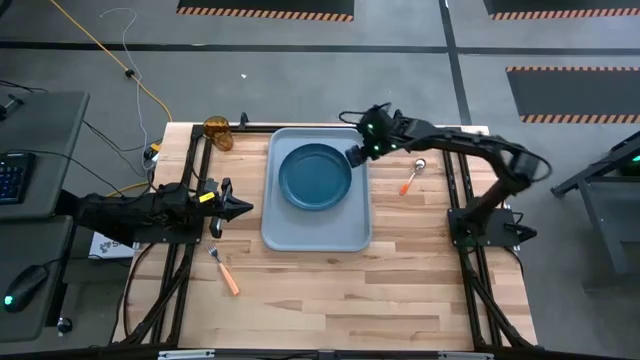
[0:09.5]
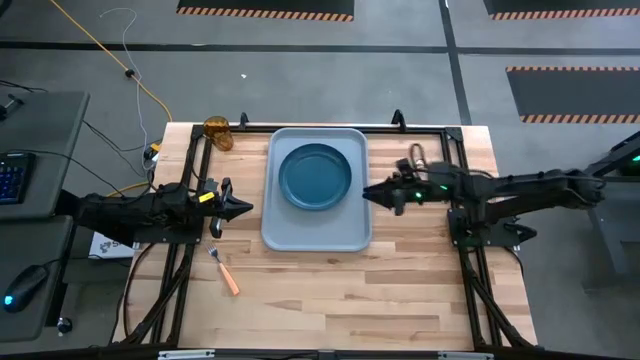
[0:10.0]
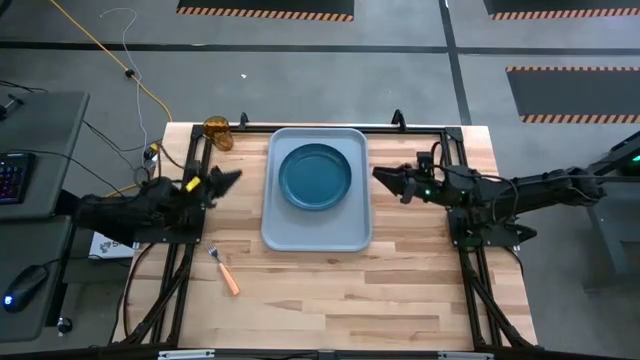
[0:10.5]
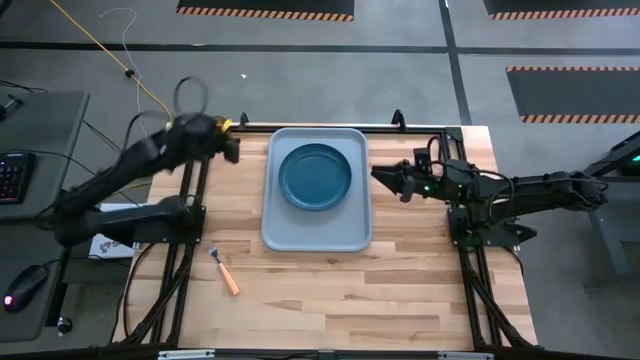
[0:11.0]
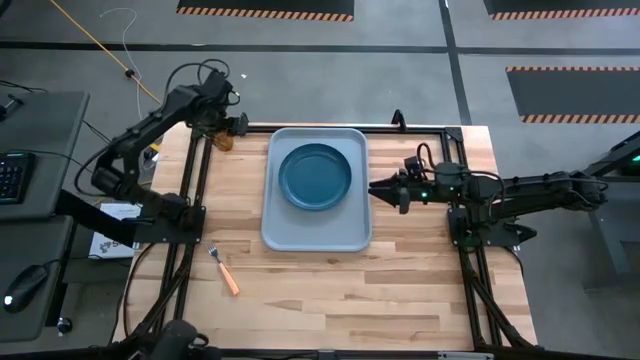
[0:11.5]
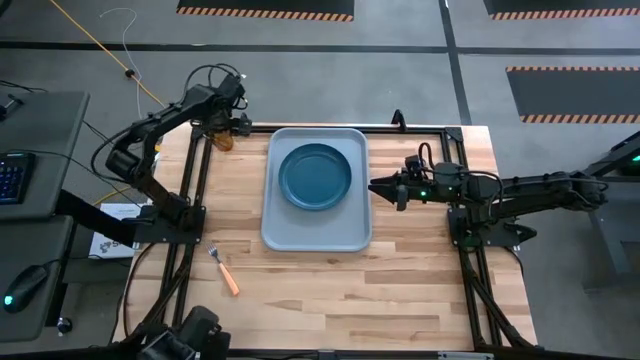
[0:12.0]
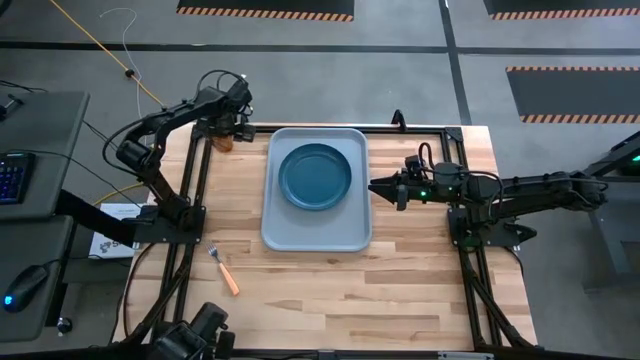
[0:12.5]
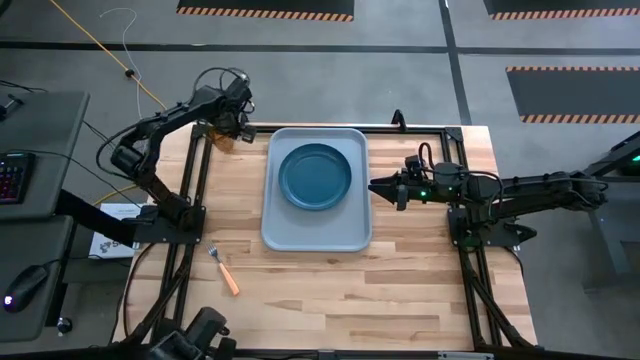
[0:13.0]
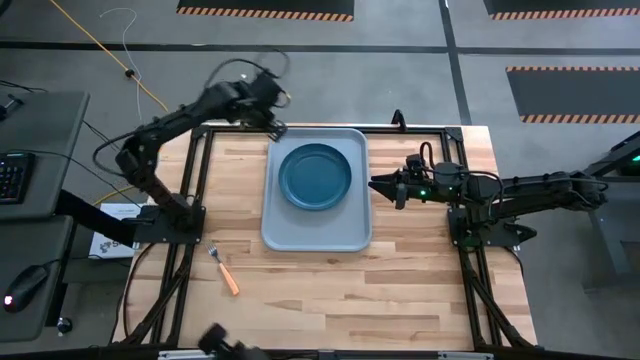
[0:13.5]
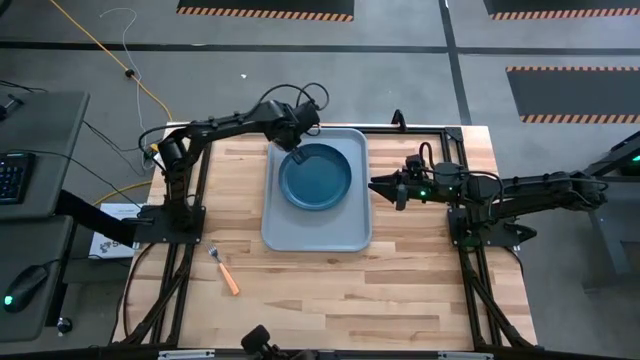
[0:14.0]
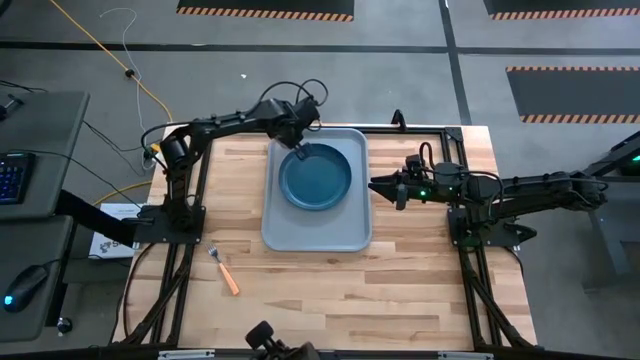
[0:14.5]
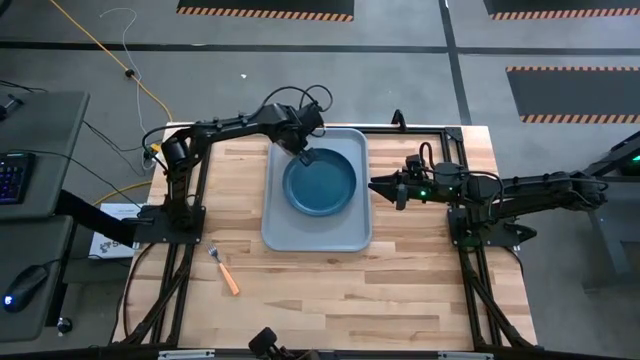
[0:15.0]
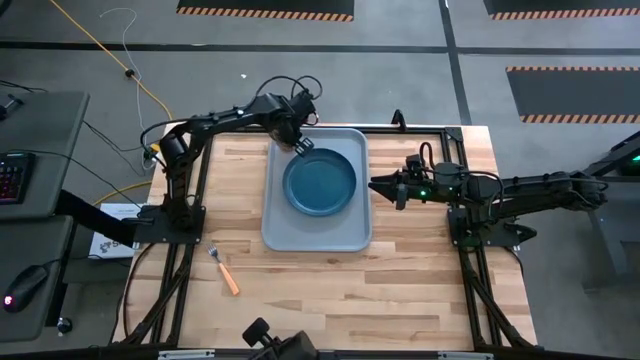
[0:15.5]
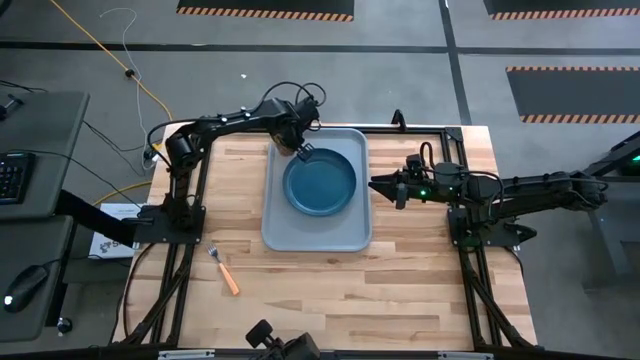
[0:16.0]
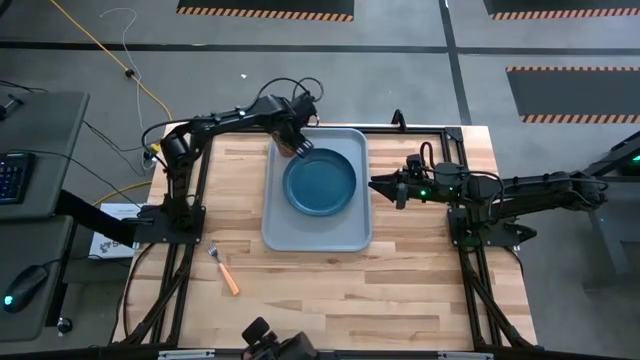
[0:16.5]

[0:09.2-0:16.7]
Task: Pick and place plate/cup/fork/spoon on tray
Put the brown glass on the top left side of the light blue tray

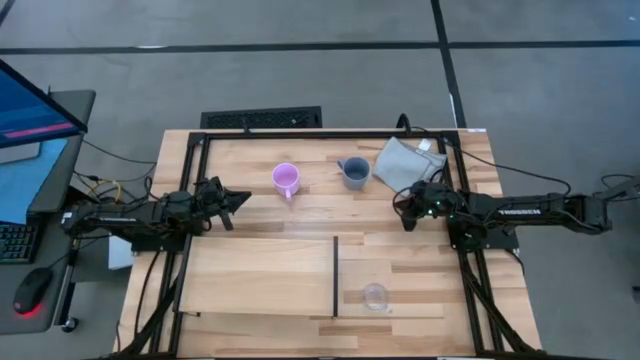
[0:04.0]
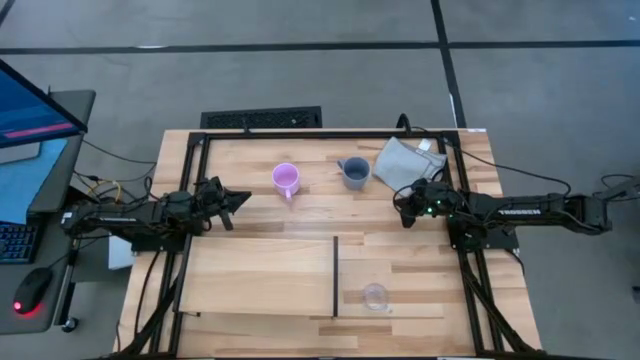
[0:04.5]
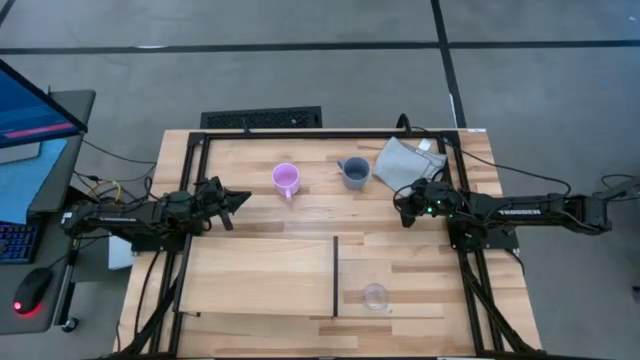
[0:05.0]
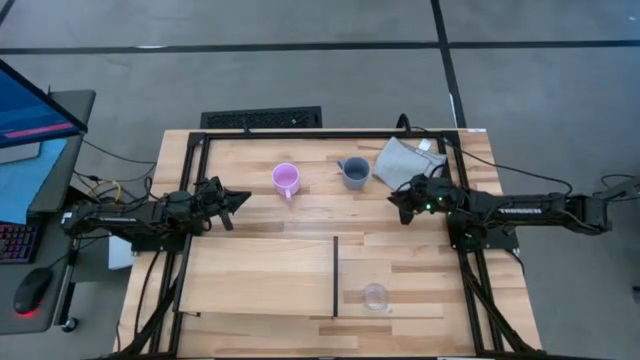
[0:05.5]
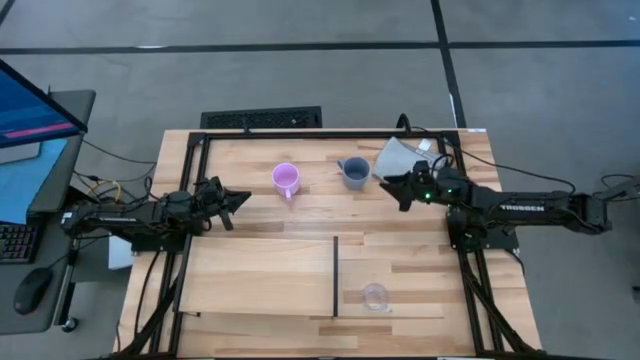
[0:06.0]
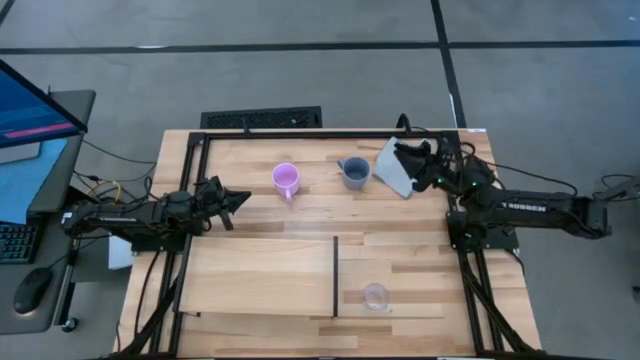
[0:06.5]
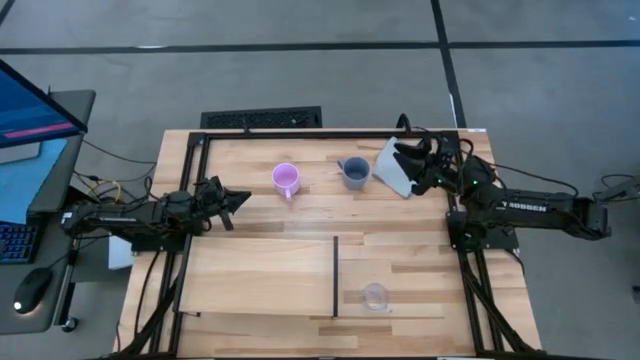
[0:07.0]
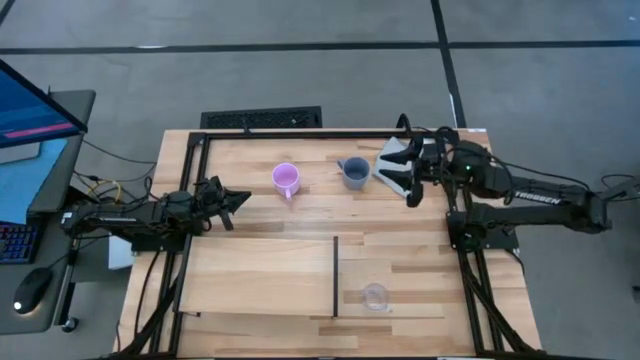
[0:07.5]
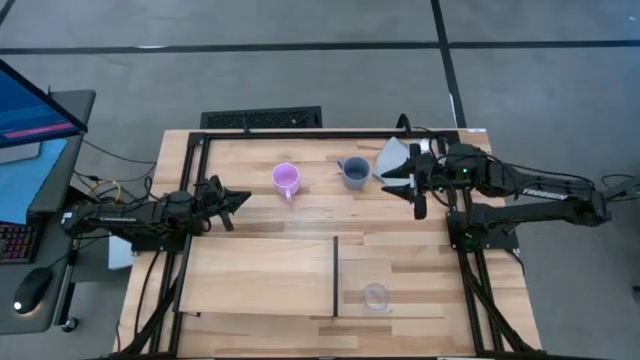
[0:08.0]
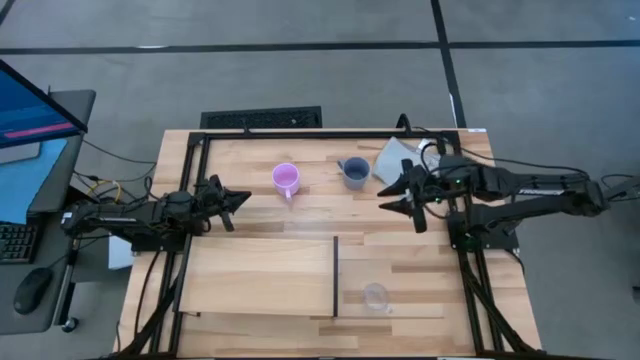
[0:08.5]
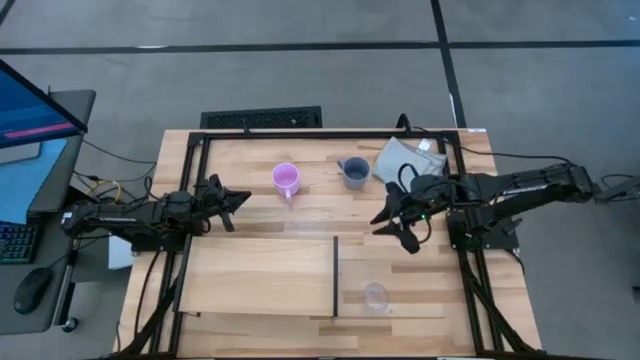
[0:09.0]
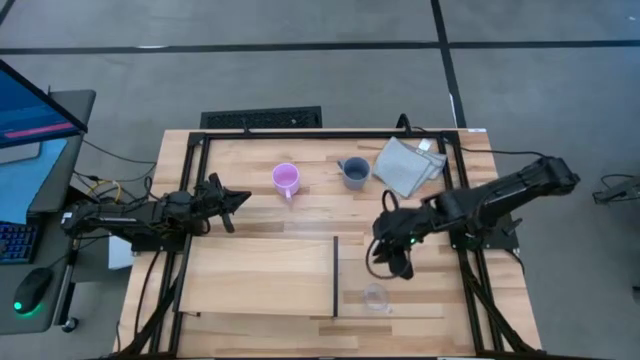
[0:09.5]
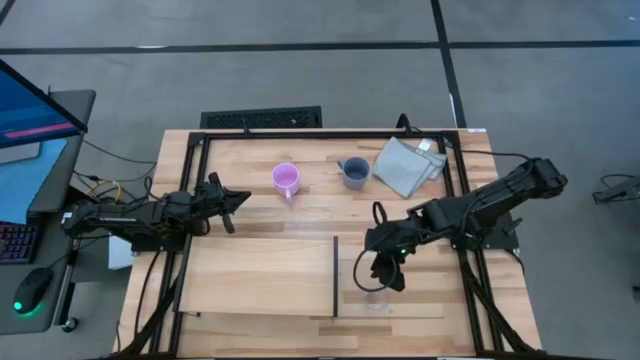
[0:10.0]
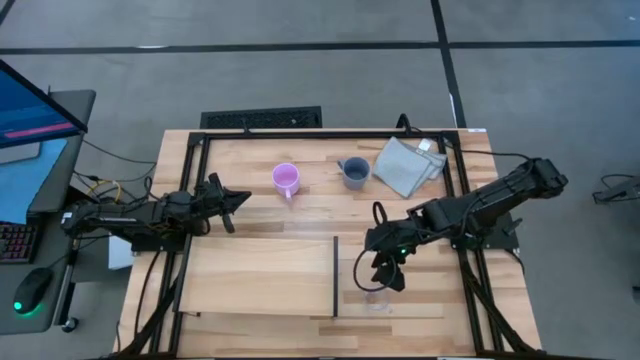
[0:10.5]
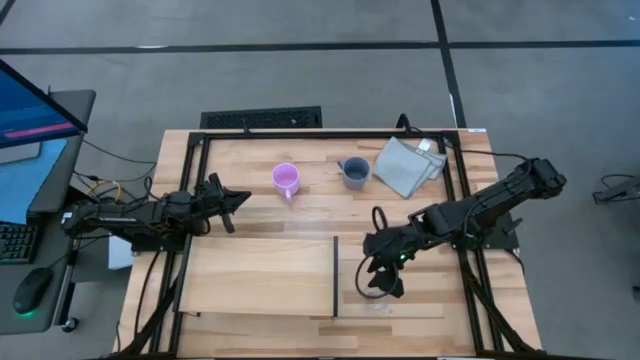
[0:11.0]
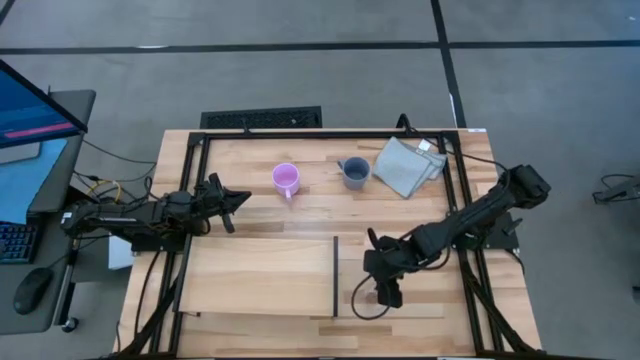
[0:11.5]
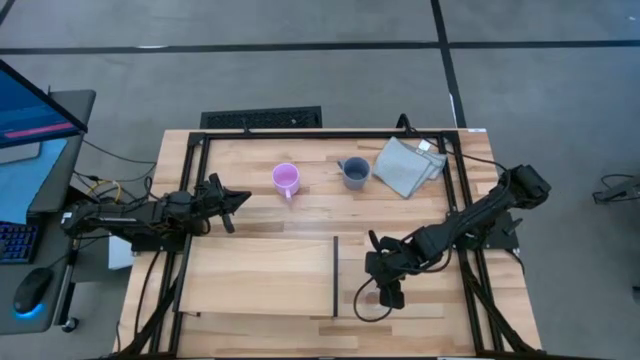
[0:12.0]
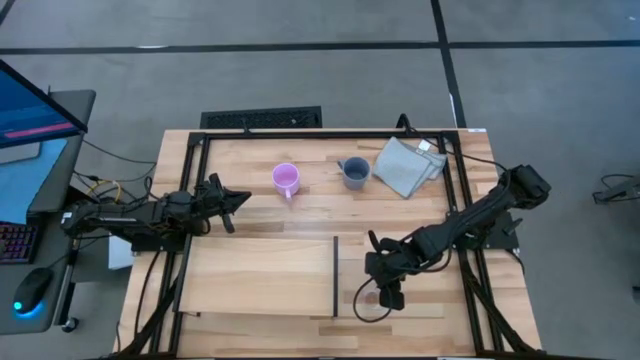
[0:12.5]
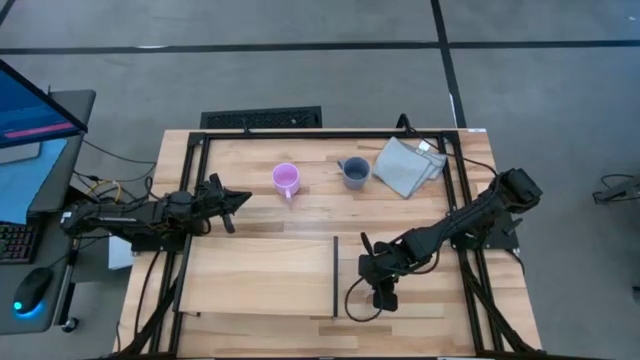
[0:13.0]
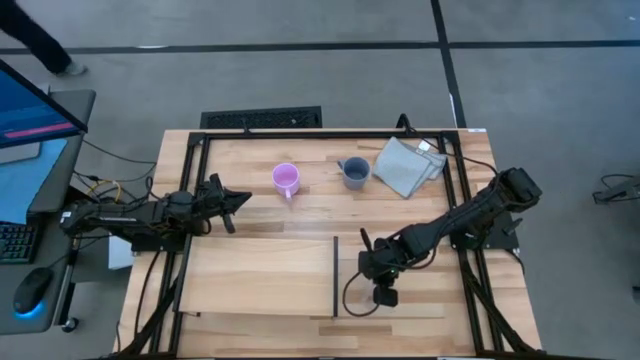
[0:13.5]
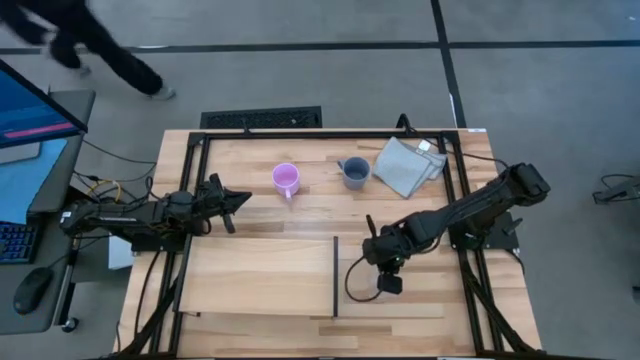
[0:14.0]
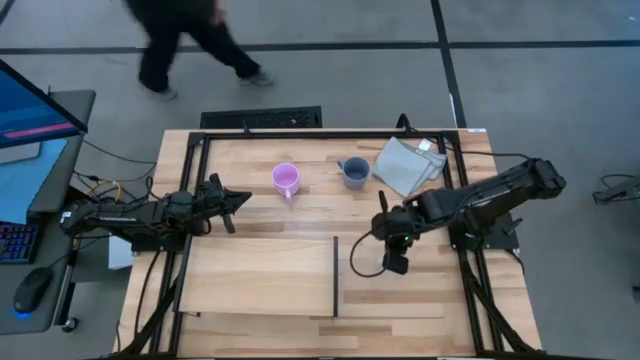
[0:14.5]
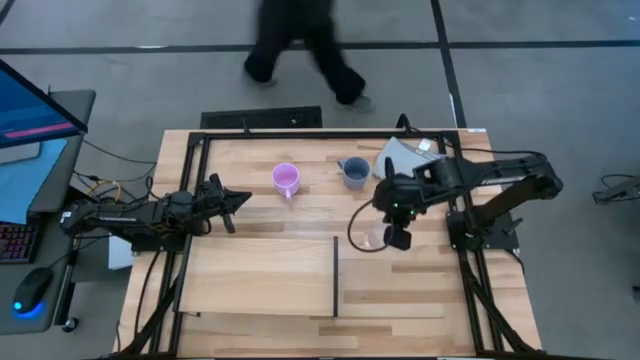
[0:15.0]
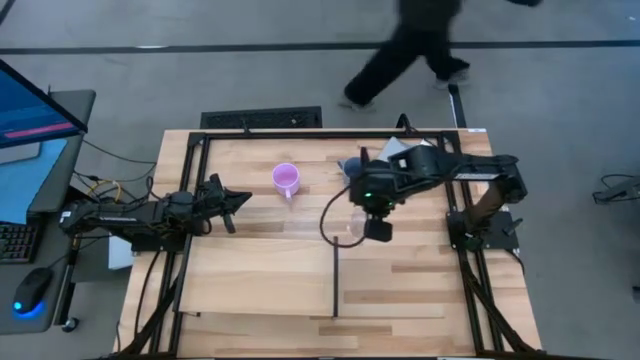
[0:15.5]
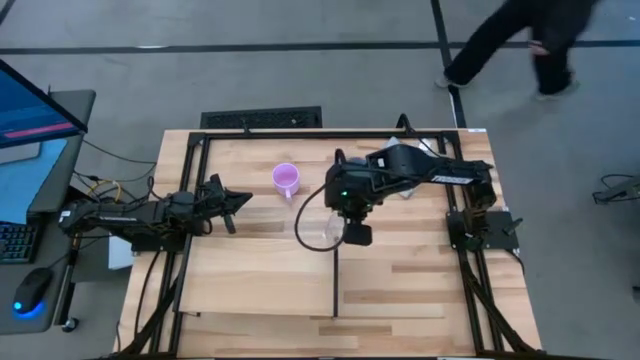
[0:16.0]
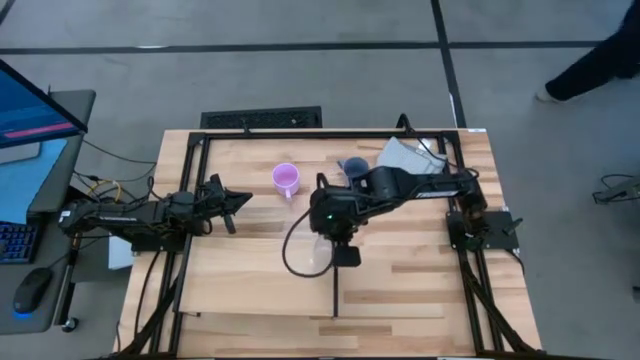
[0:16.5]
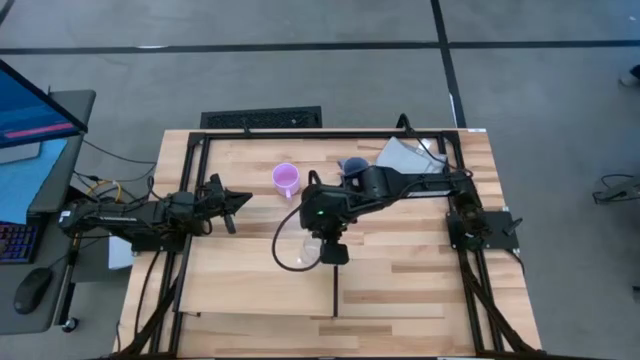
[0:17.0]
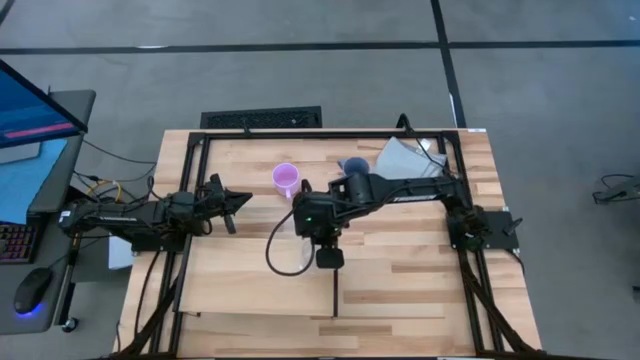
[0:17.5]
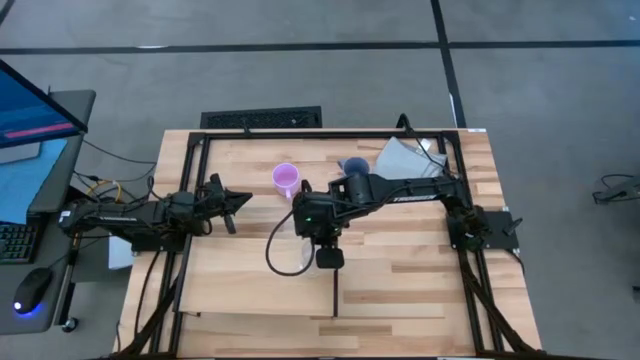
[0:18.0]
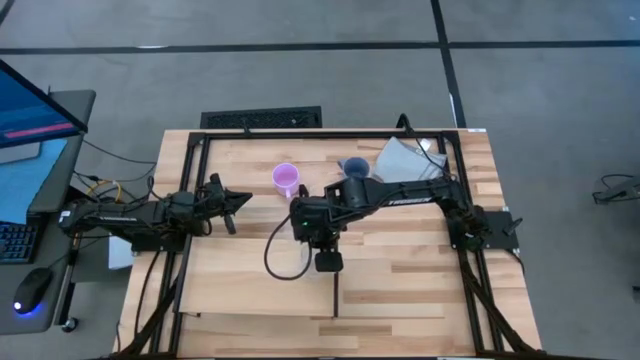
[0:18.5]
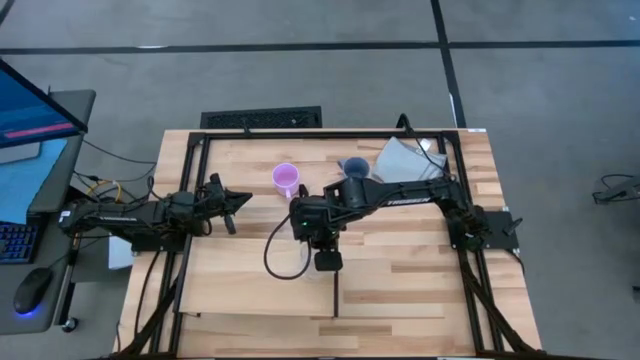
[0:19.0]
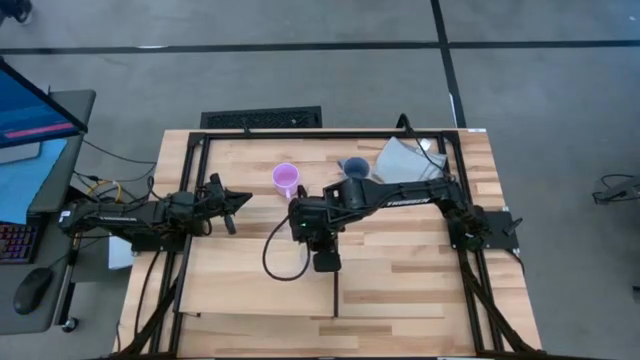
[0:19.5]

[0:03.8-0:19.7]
Task: Stack small to large cups/mugs on shelf
Put the transparent mug on the shelf
